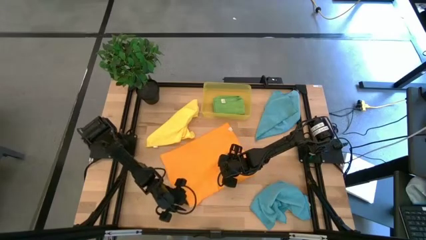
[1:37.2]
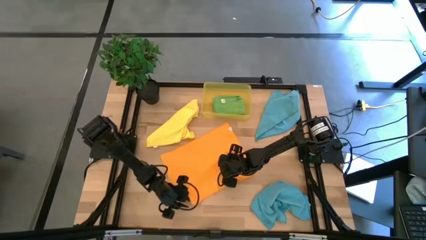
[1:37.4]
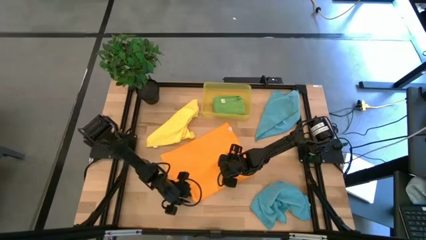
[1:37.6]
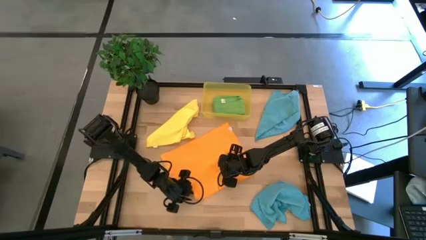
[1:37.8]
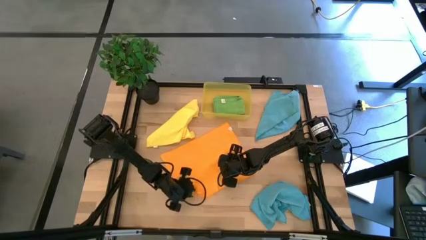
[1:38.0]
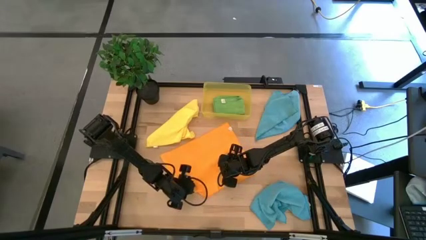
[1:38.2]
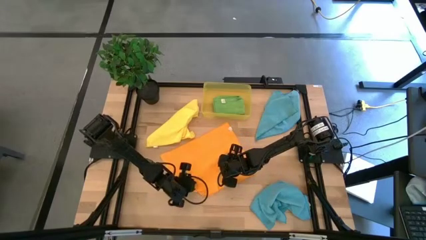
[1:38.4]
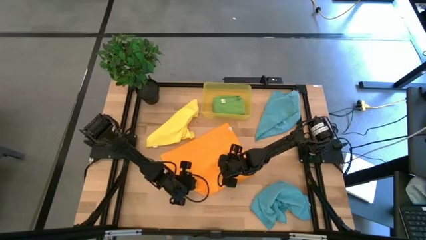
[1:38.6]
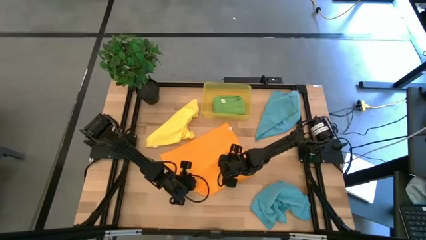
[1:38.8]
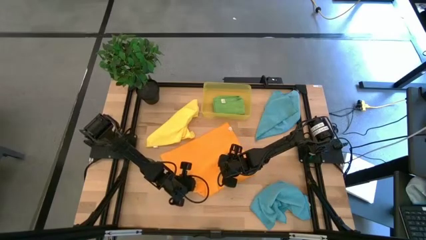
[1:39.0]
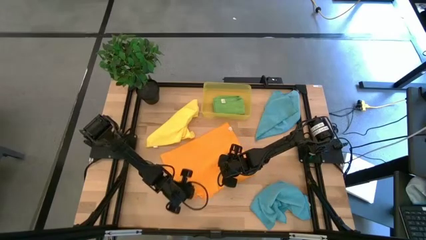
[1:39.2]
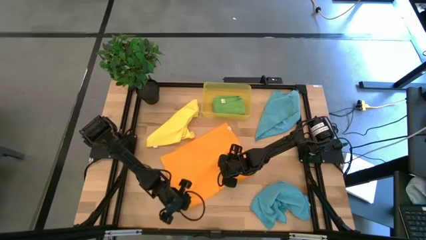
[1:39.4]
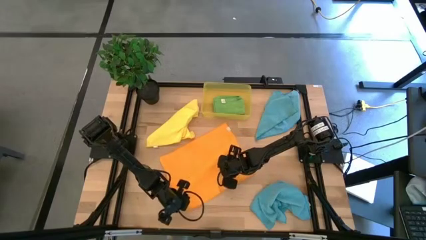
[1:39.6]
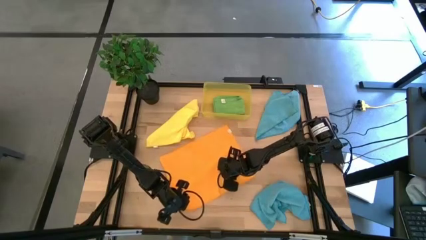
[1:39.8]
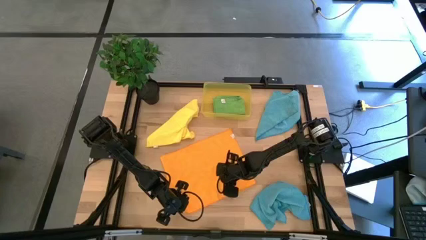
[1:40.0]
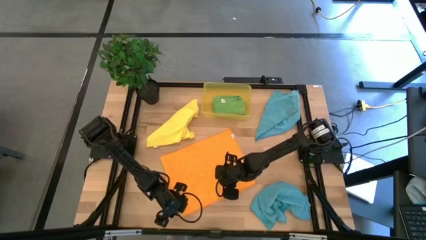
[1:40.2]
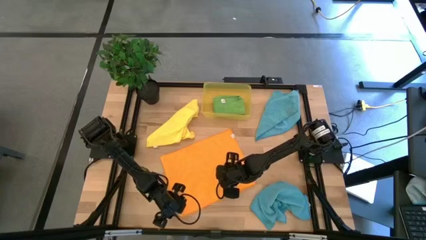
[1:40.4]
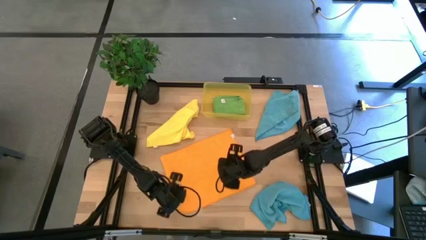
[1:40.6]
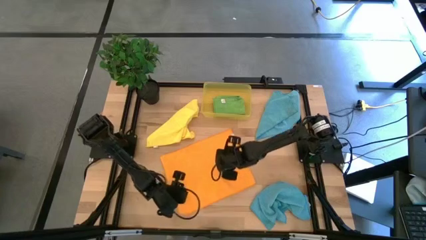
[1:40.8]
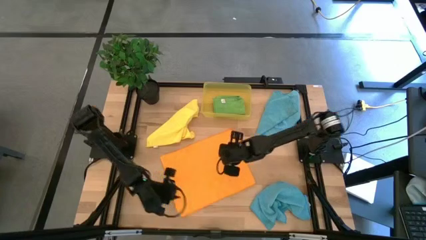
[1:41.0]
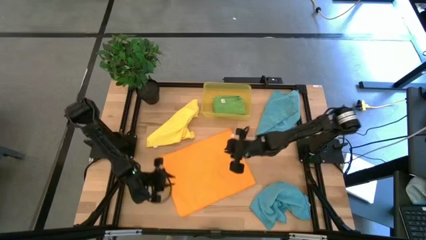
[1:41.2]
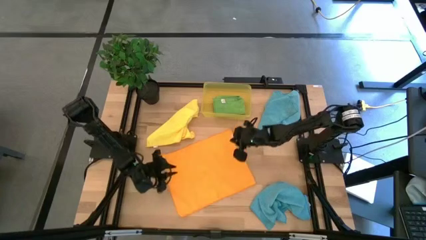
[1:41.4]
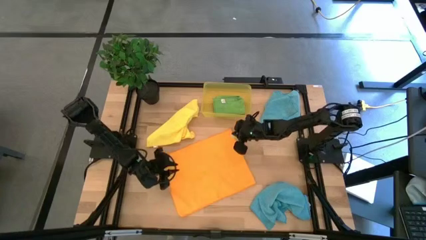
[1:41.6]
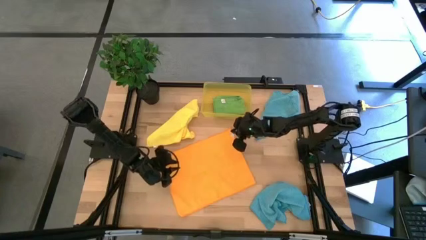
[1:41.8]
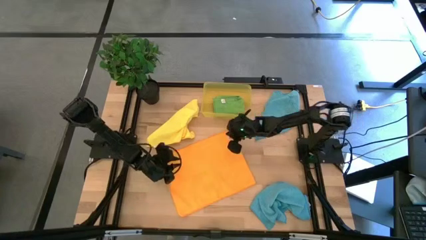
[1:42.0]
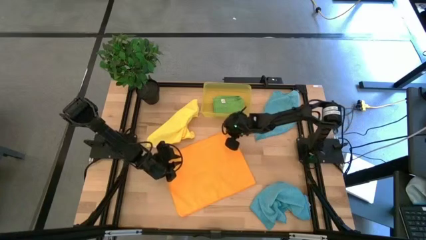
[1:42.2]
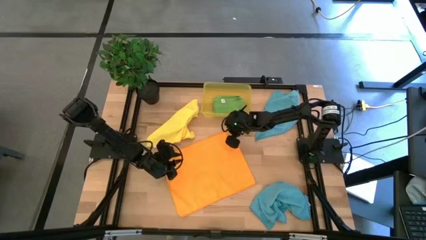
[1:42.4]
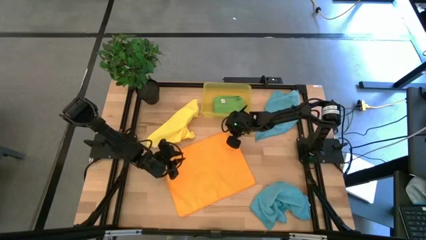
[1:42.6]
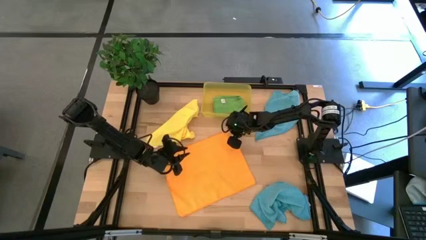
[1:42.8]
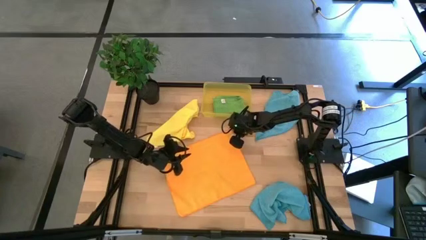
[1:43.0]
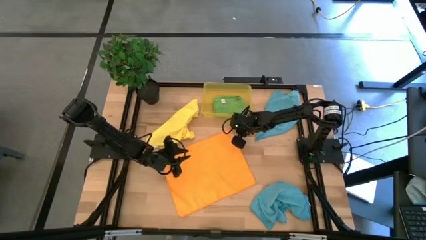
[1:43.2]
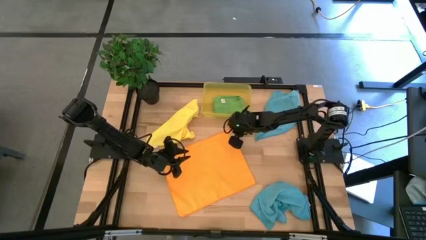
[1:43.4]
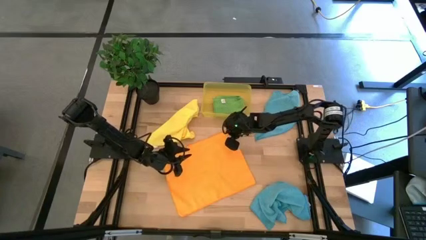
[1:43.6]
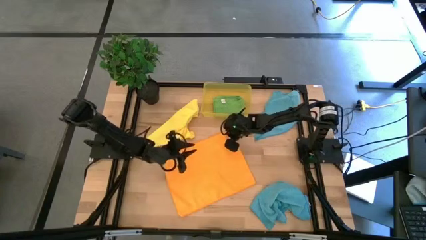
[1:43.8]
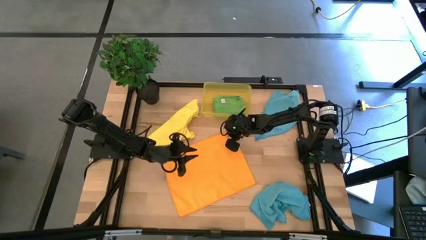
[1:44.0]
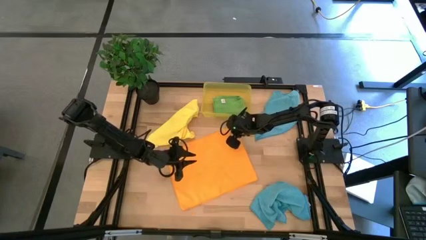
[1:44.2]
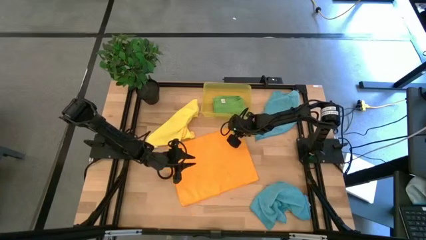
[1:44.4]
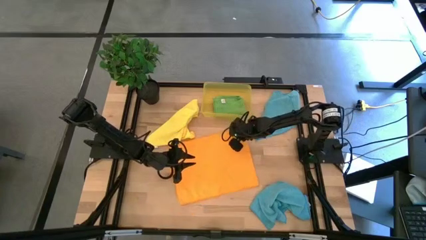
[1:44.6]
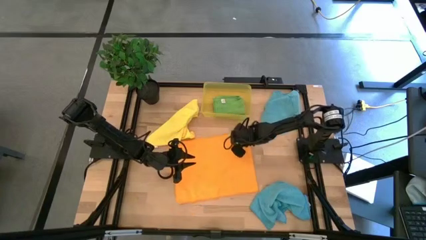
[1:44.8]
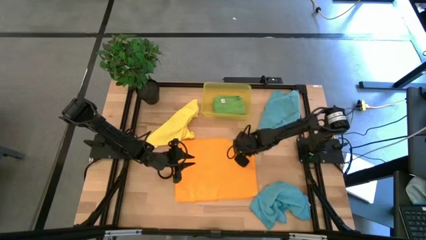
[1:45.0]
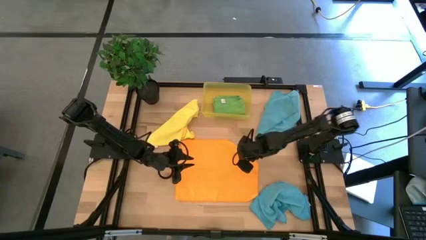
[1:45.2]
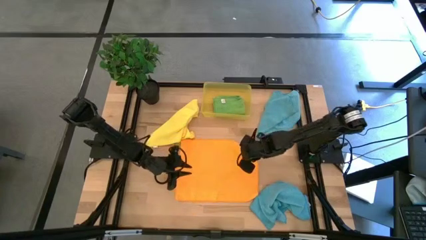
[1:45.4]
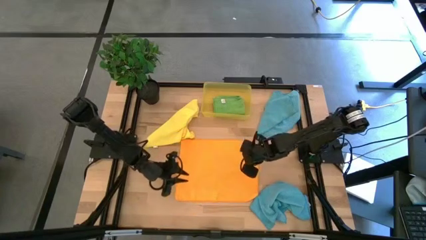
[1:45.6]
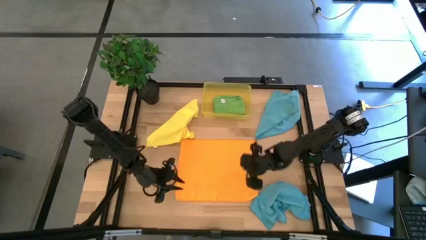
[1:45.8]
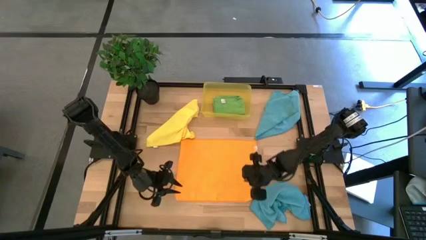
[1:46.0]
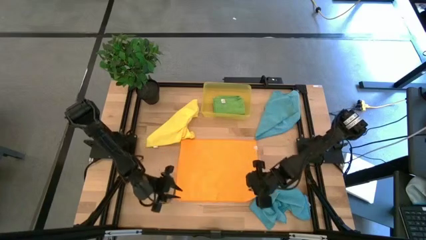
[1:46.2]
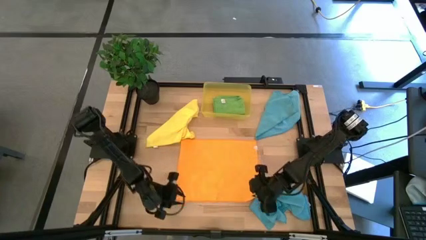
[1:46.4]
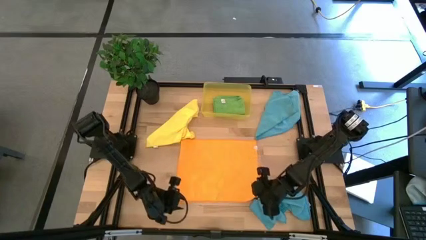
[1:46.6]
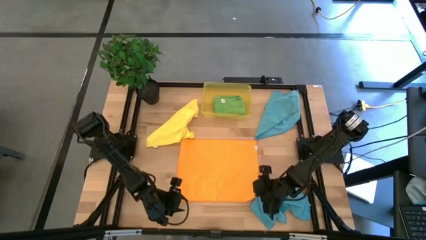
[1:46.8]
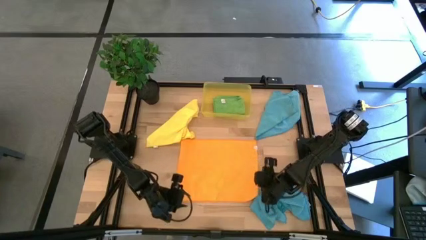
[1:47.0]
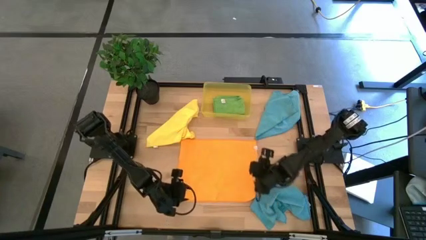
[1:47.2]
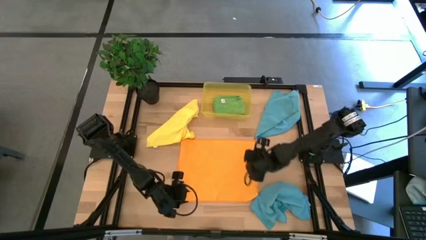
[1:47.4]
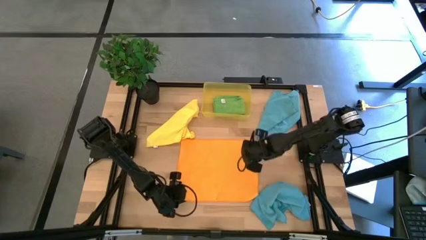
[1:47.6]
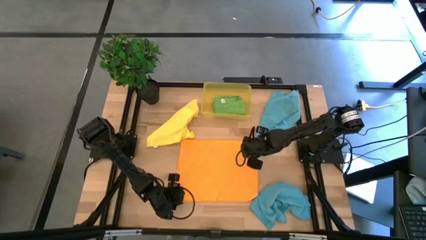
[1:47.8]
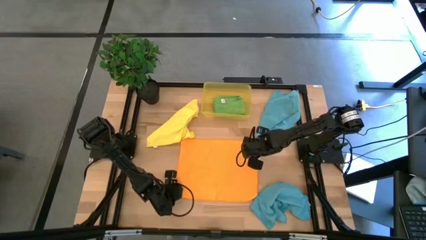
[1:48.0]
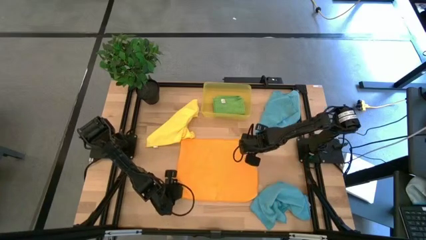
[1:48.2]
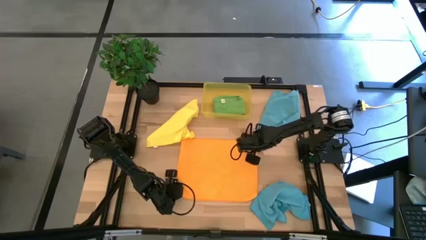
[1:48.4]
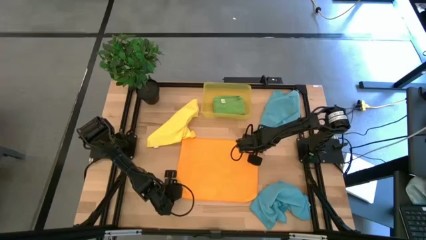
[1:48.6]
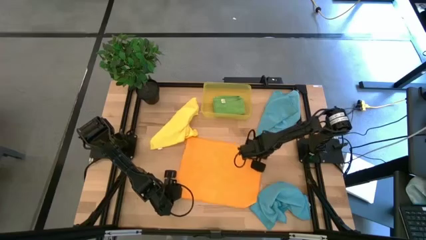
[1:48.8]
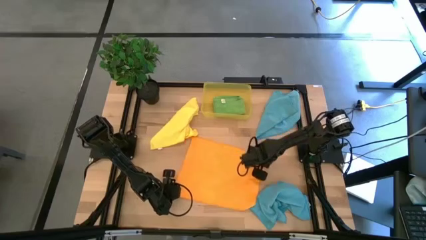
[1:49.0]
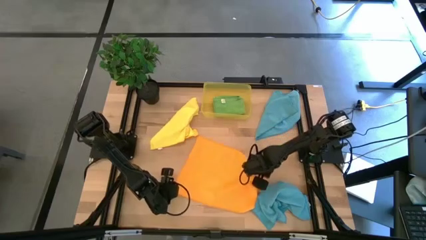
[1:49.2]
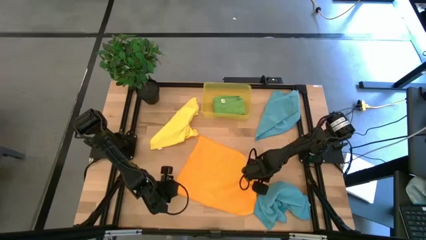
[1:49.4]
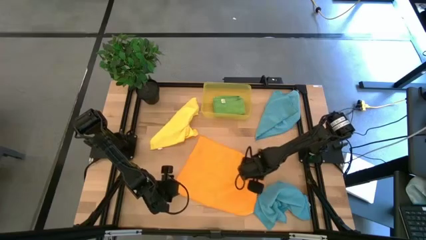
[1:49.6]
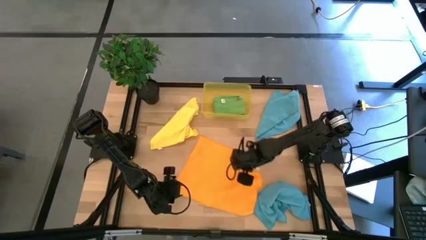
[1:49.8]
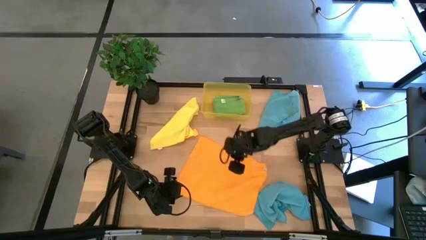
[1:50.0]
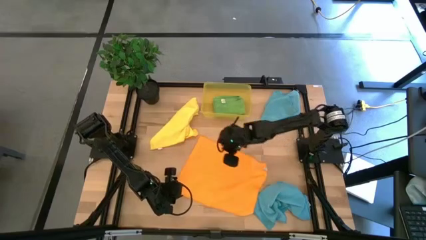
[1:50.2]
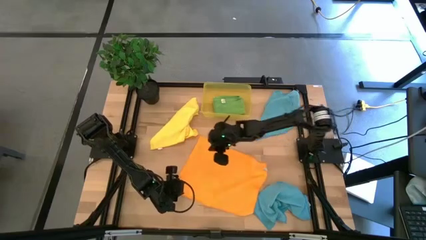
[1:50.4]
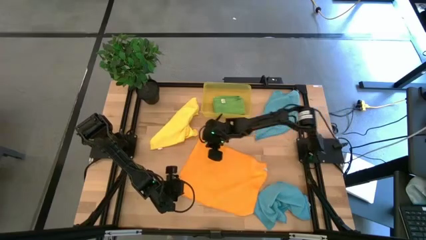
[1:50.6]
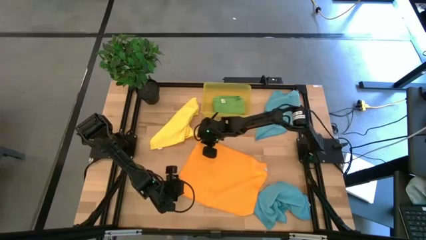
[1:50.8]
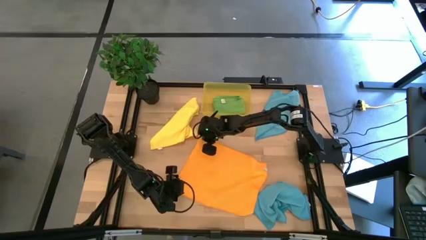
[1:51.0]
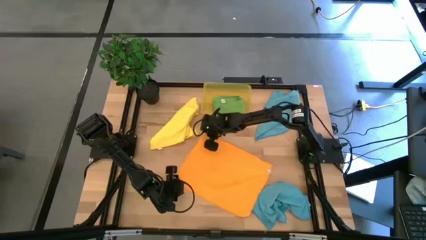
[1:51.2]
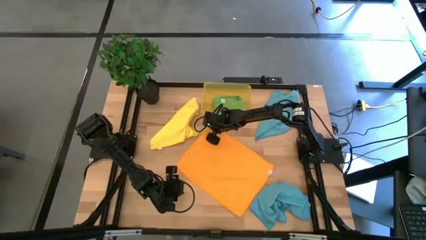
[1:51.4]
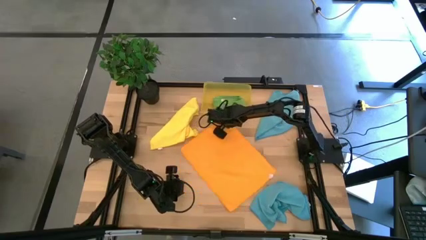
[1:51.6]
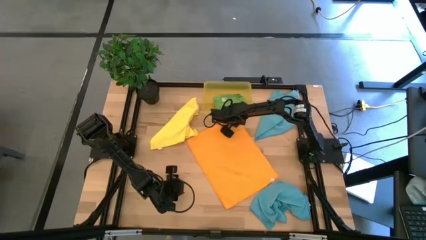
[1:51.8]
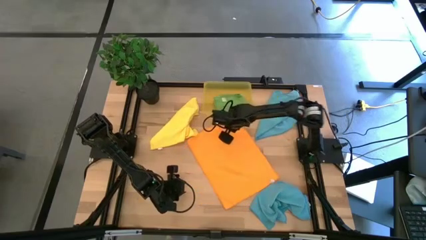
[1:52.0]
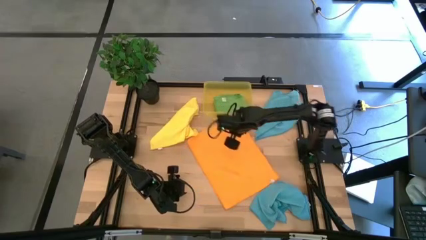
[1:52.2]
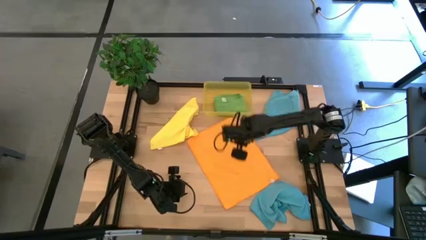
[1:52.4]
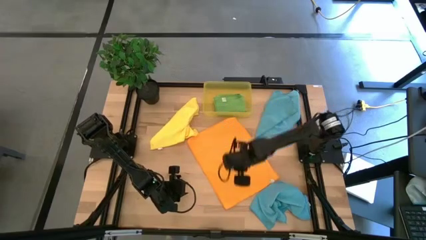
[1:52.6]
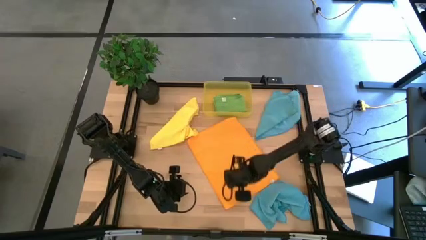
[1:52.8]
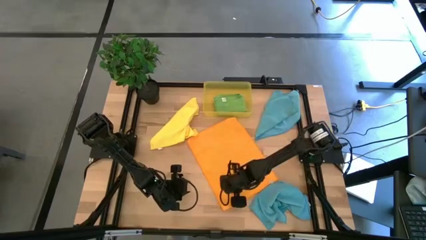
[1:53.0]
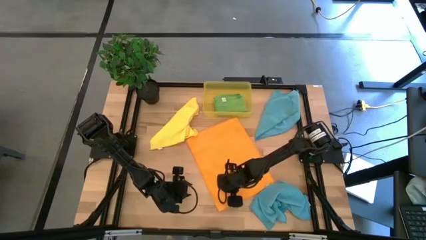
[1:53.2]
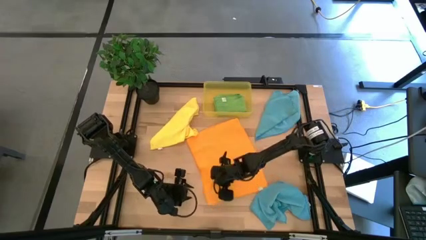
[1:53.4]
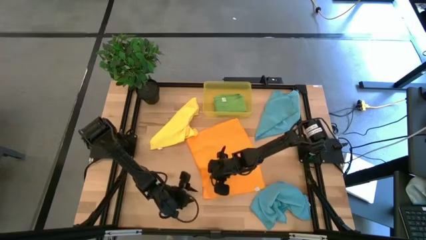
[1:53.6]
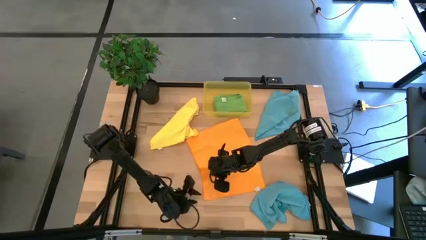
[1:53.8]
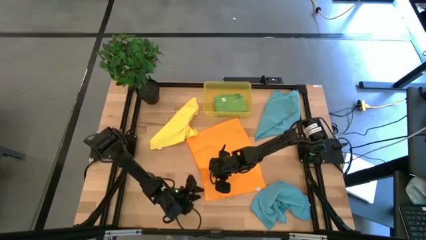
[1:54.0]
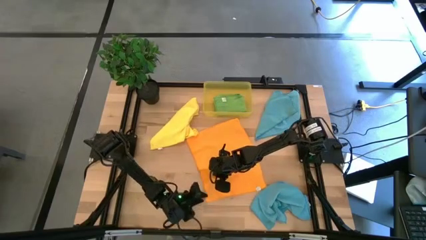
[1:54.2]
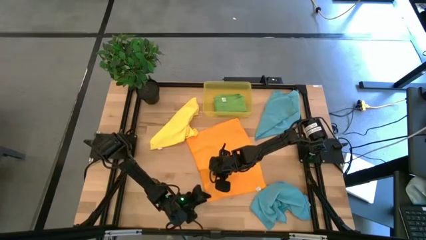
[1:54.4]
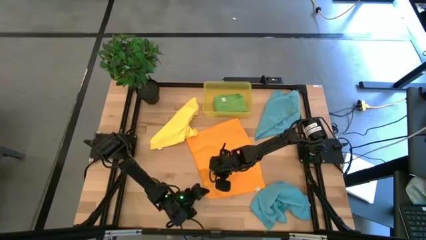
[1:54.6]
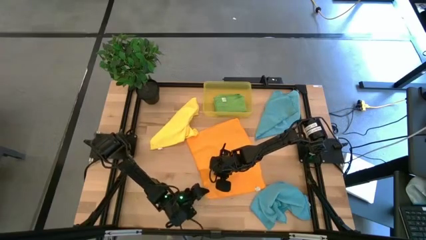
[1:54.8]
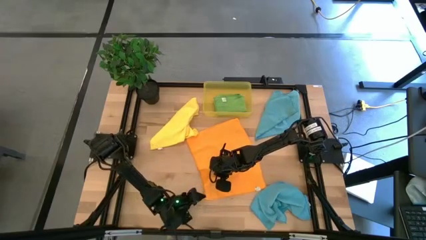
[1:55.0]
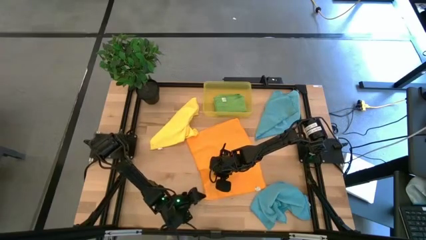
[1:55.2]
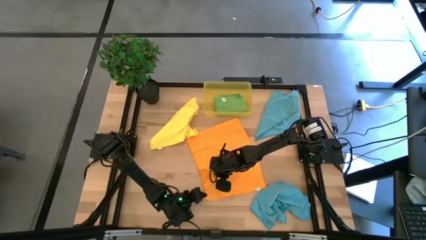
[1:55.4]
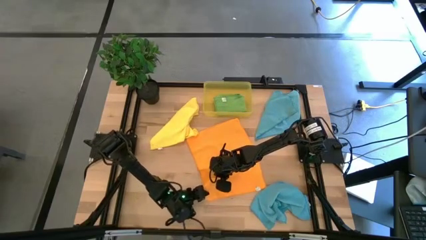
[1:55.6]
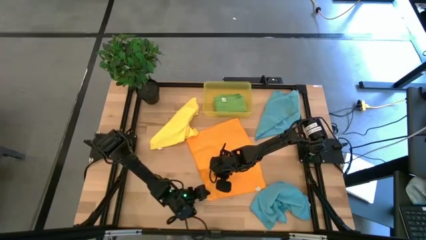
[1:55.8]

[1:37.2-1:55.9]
Task: Fold microfiber towels
Fold the orange microfiber cloth
